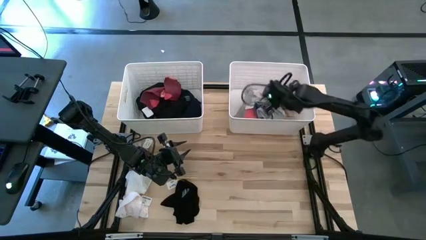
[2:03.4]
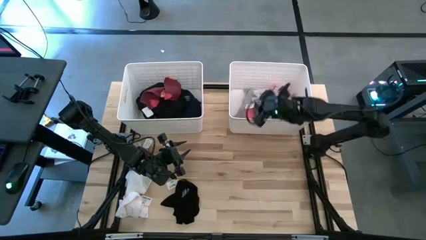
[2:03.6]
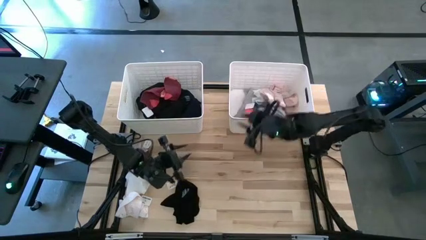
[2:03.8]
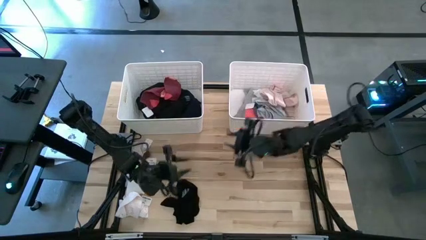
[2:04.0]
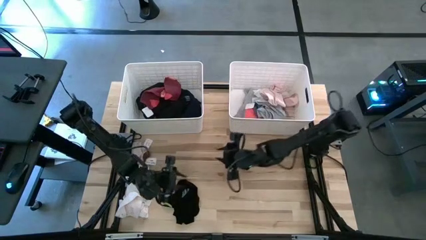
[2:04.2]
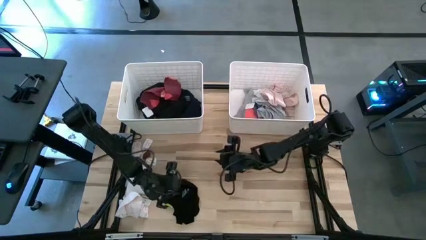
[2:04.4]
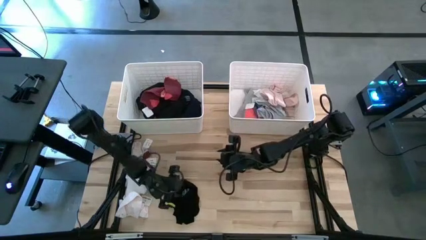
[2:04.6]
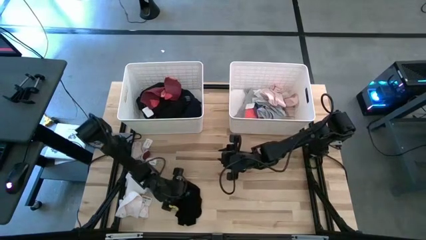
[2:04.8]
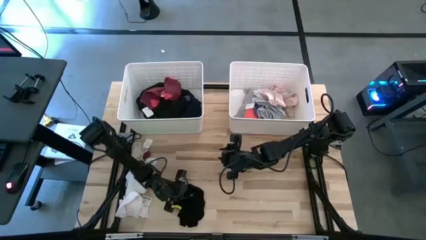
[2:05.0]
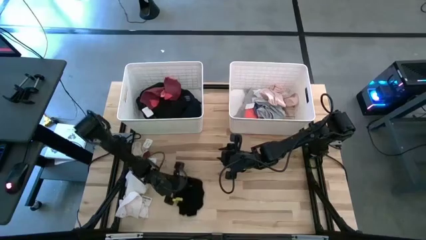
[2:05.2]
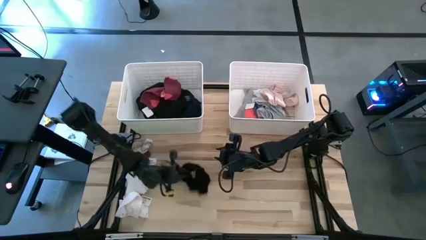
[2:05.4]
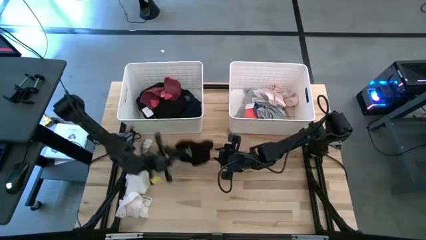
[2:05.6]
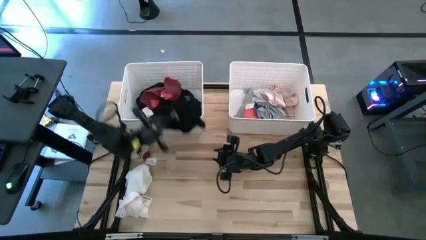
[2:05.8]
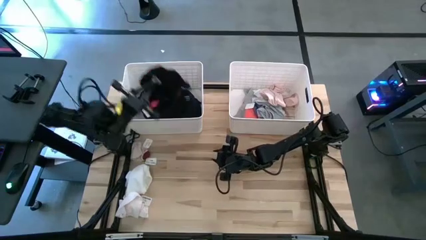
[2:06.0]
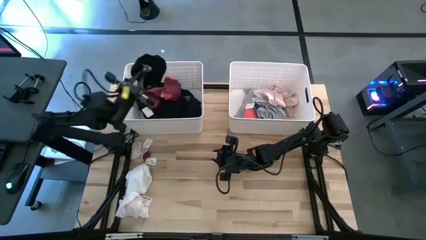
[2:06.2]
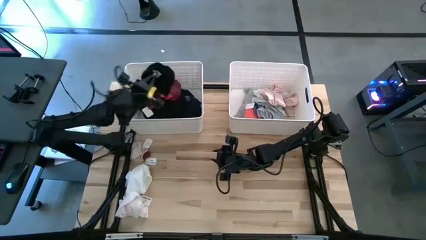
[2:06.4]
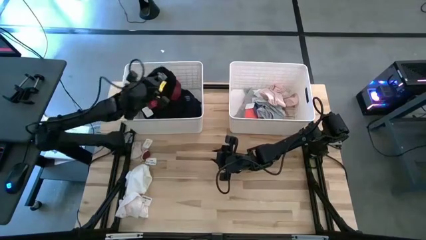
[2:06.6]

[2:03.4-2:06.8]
Task: Sort clothes
Put the black underwear into the left white laundry bin

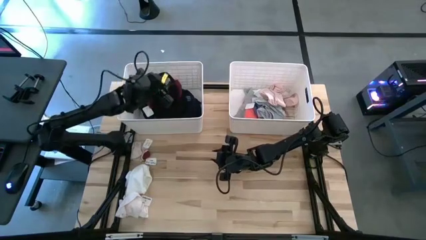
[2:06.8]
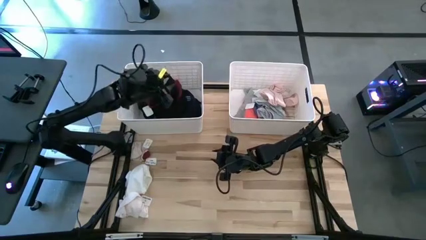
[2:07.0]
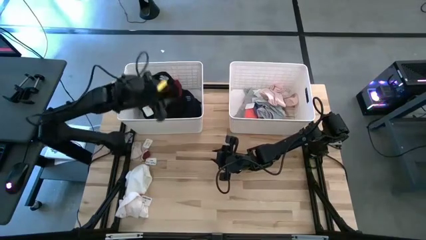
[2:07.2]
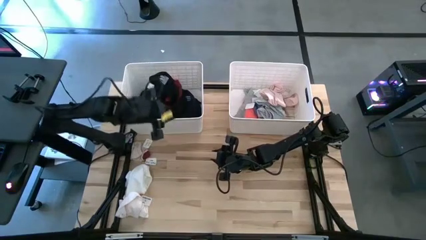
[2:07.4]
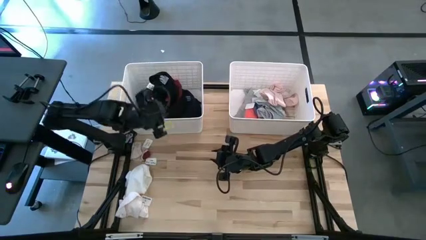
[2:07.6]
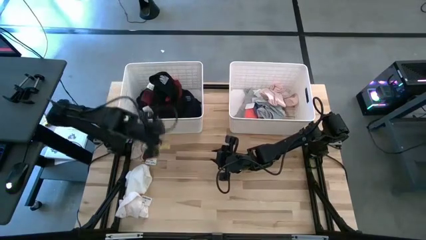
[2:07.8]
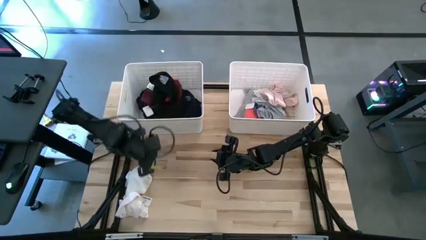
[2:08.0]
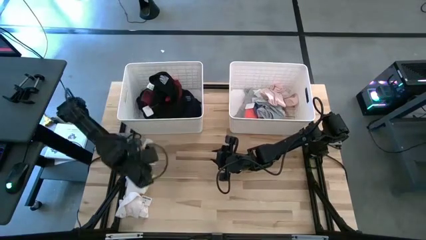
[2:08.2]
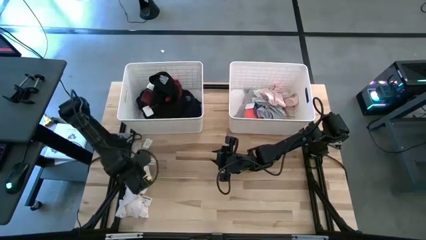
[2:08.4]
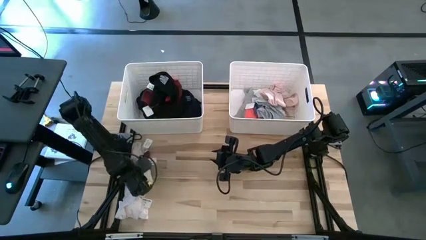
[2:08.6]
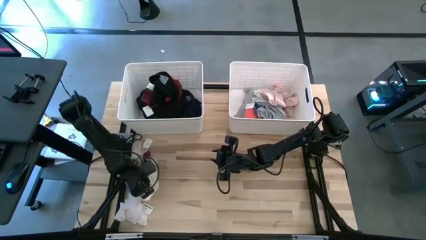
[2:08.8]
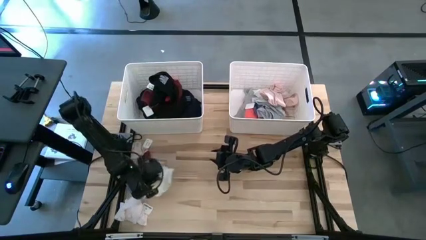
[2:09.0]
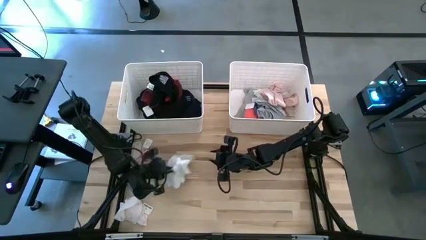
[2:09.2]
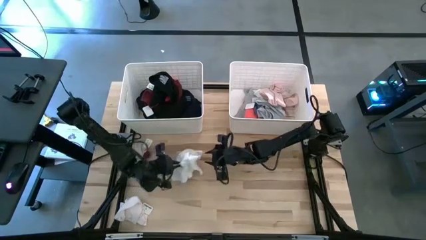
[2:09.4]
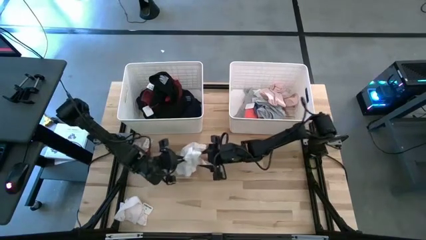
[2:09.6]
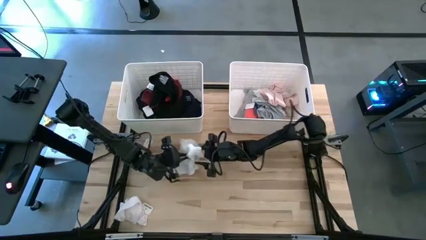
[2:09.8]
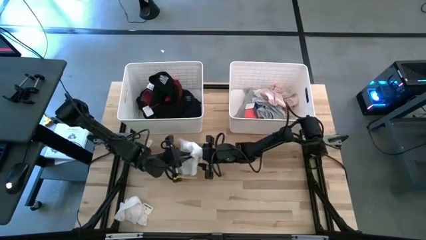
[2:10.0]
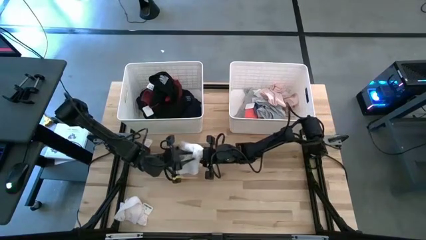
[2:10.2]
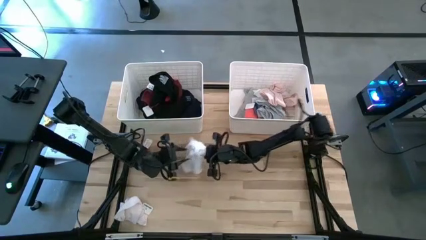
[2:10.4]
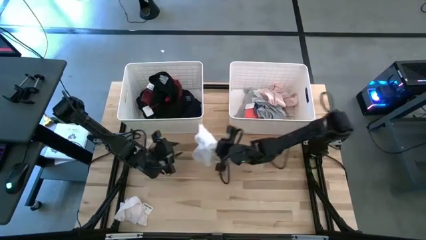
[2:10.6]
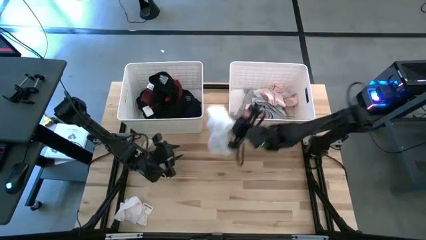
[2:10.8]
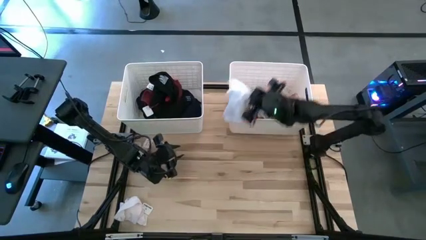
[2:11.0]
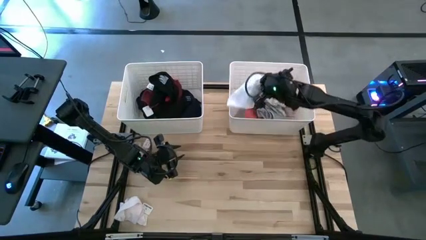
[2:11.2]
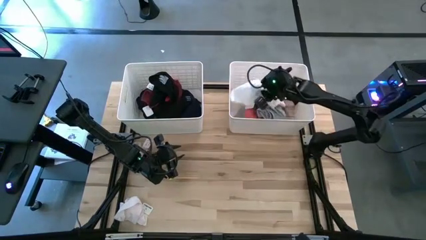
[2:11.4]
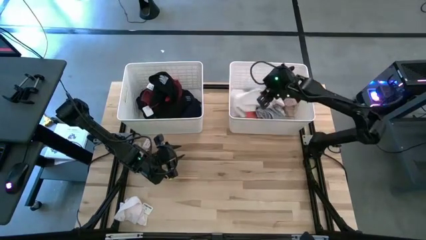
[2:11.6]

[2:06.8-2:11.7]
Put the white underwear into the right white laundry bin

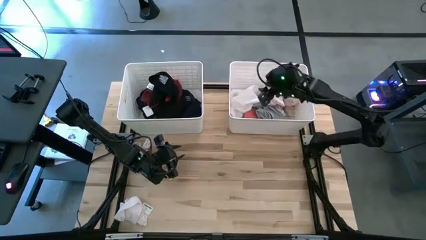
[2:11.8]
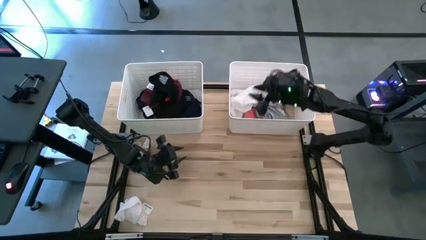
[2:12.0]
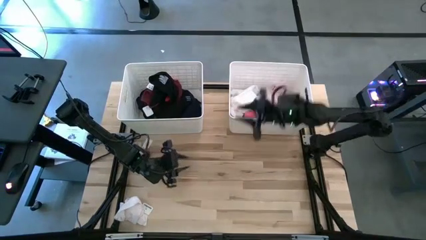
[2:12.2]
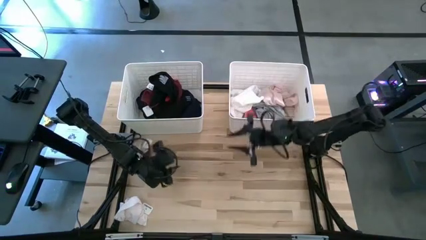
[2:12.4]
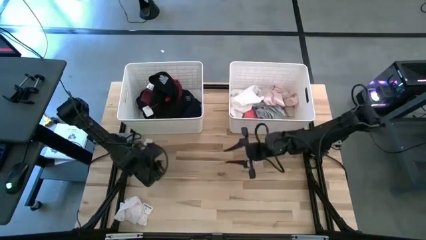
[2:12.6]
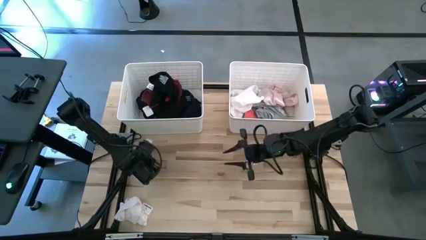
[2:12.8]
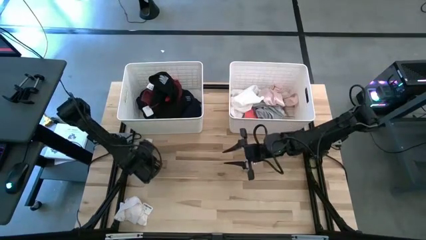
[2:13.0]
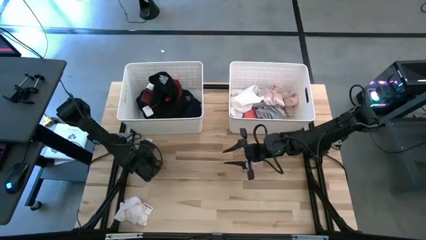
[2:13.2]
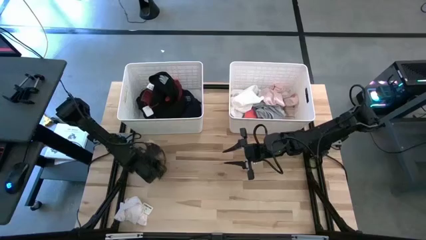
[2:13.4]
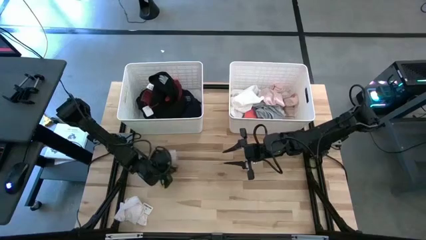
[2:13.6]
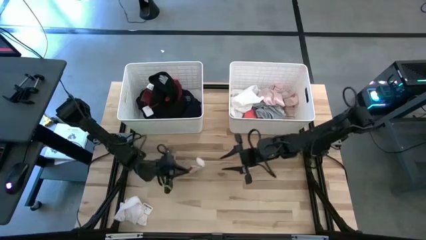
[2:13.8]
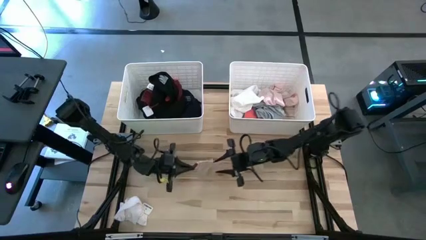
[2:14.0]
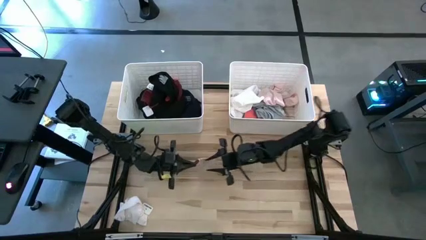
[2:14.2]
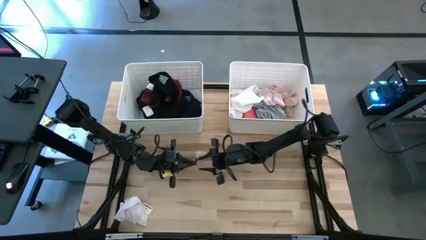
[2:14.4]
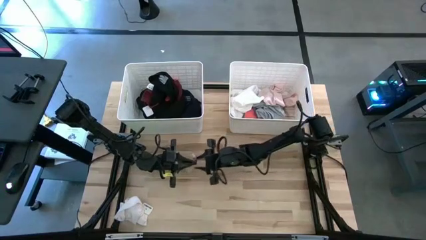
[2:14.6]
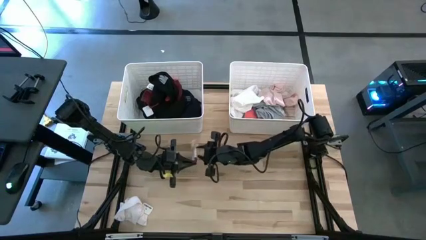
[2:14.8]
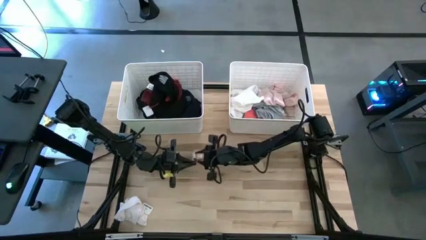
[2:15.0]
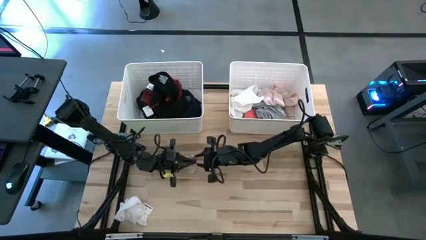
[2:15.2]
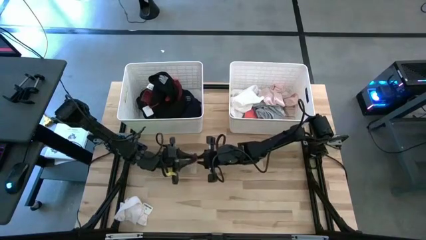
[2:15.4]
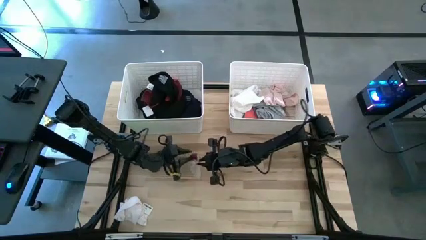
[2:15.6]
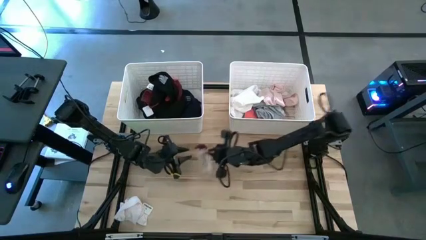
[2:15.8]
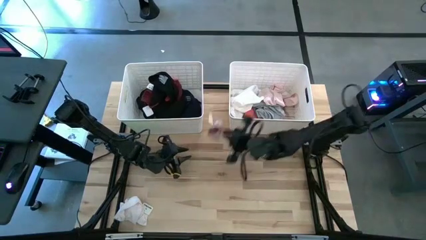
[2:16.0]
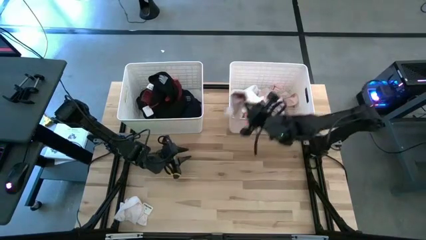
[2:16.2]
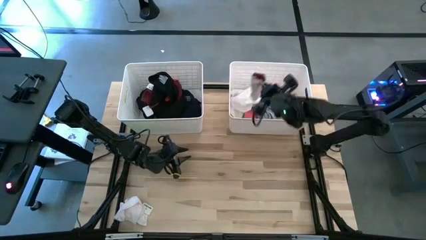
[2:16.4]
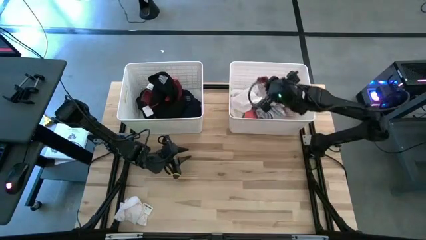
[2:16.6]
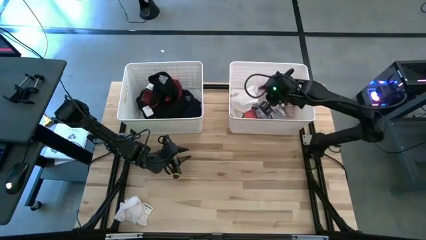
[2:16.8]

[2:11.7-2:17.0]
Put the gray patterned sock into the right white laundry bin

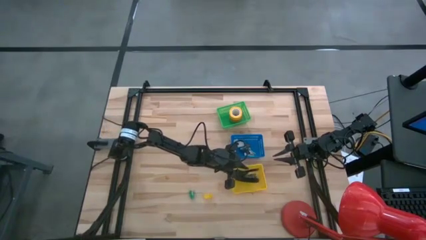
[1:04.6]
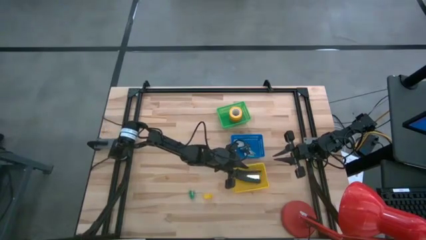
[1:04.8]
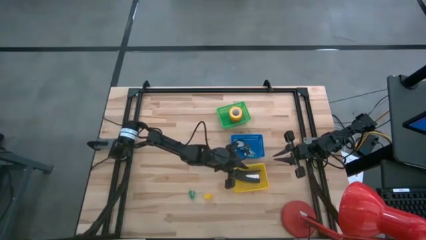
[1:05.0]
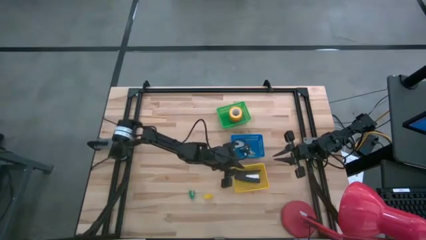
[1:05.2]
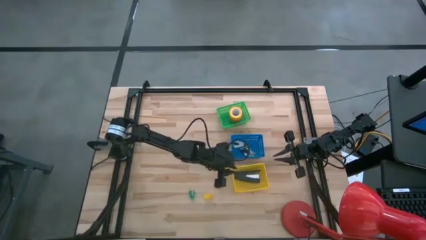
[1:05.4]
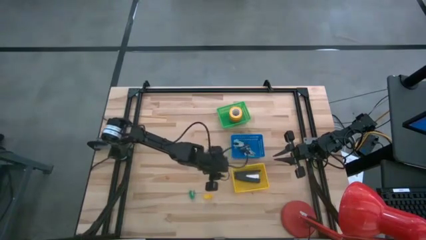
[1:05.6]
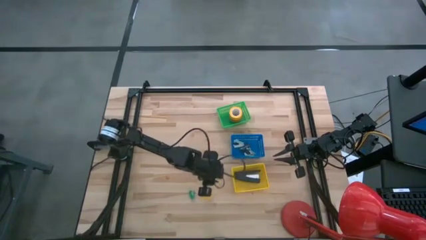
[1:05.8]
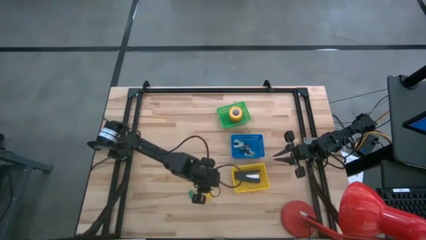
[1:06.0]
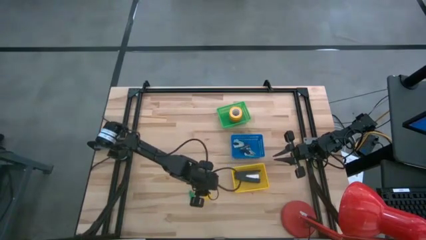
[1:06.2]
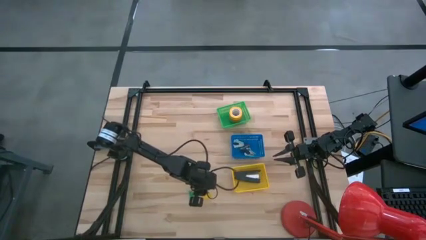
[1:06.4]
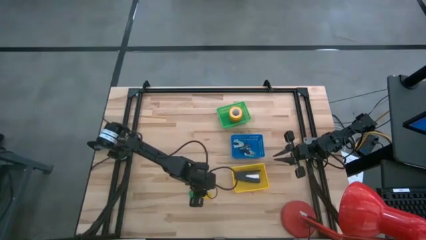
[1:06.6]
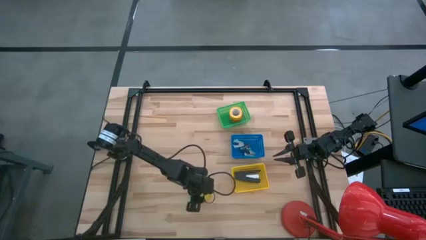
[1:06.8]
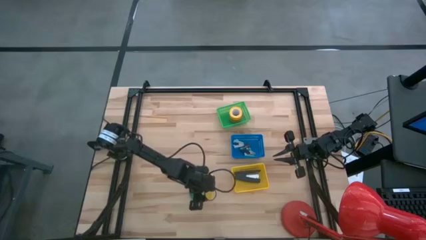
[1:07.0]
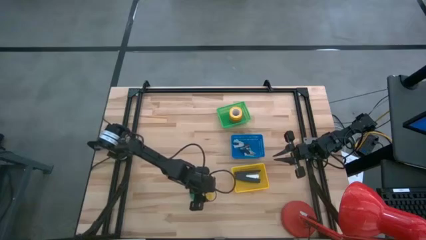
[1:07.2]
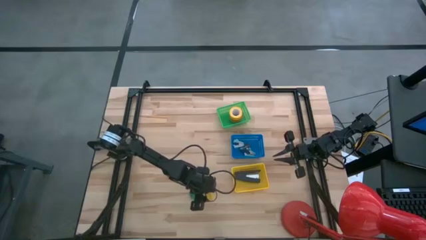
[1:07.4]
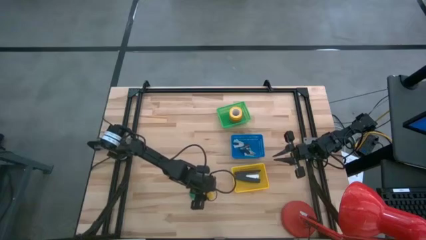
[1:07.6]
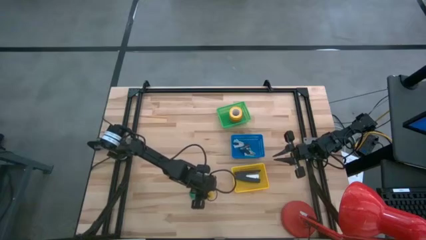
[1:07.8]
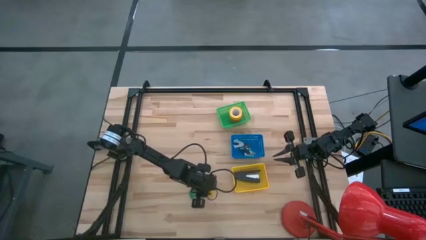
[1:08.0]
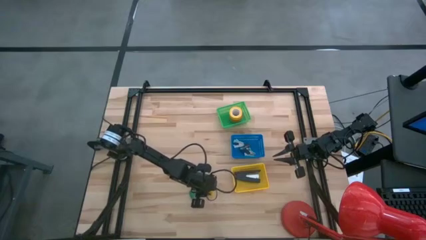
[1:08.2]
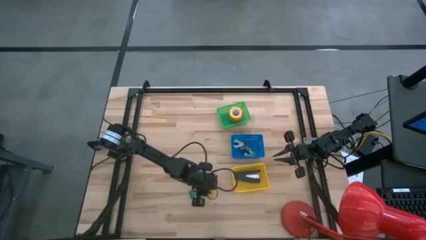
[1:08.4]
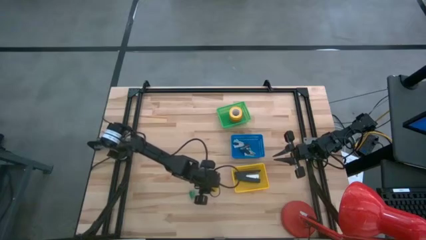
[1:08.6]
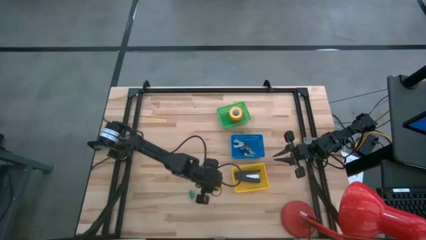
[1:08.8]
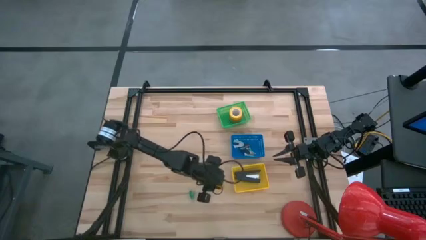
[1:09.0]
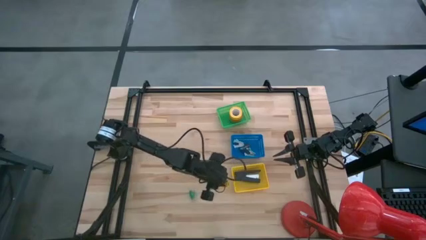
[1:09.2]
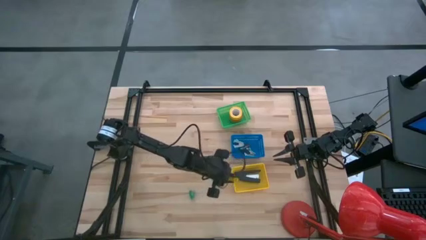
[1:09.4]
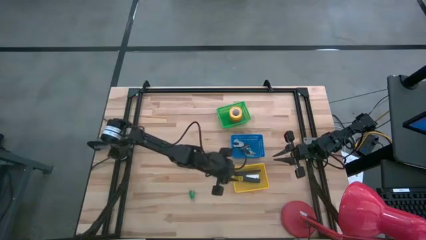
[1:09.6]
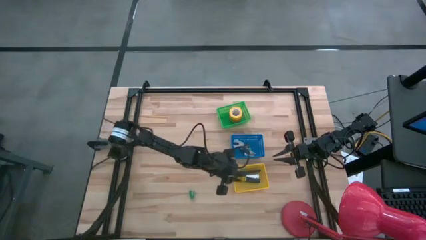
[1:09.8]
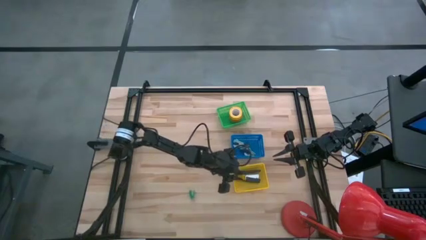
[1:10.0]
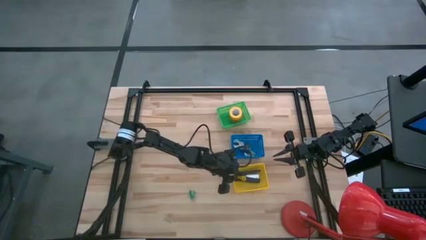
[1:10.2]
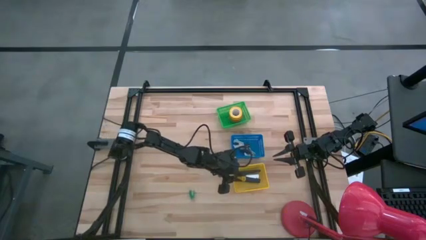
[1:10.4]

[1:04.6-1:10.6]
Task: Pick and place Stapler, Stapler remover, tape
Put the yellow stapler into the yellow bin
